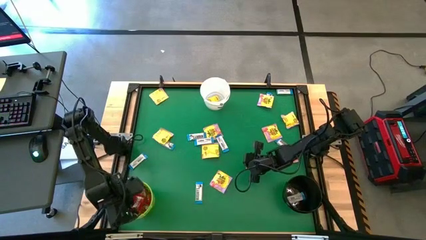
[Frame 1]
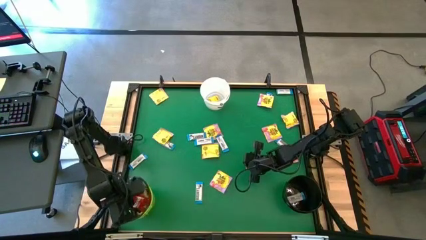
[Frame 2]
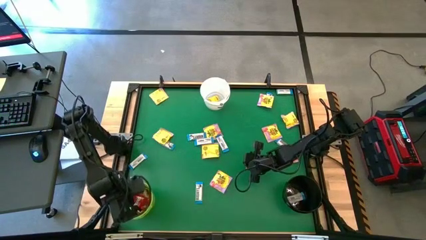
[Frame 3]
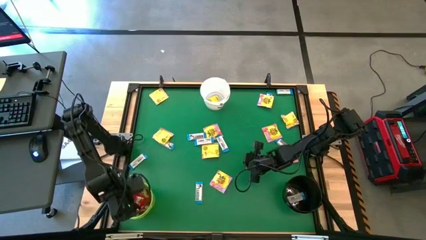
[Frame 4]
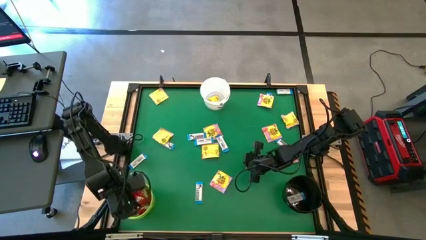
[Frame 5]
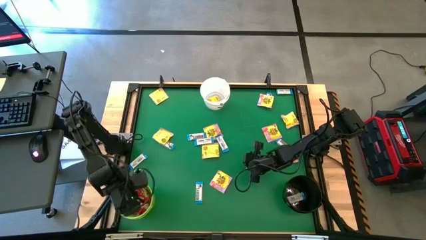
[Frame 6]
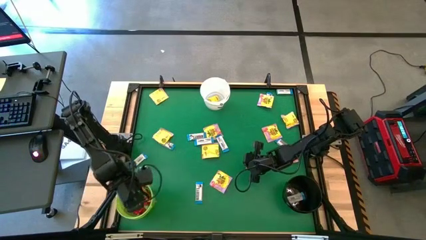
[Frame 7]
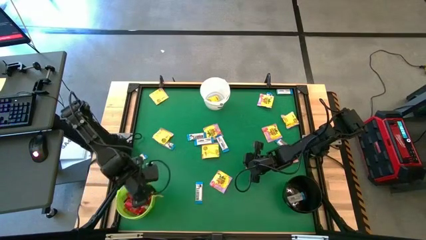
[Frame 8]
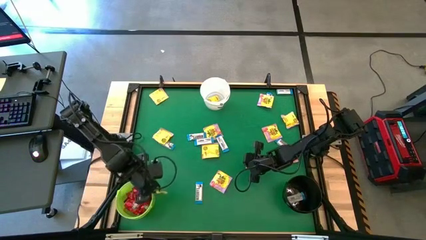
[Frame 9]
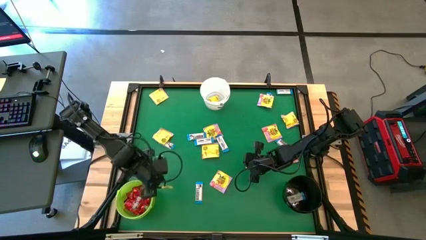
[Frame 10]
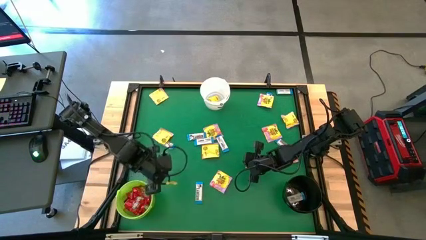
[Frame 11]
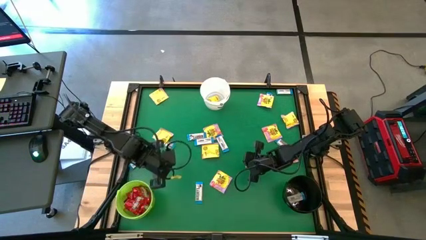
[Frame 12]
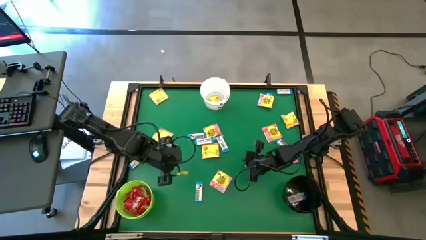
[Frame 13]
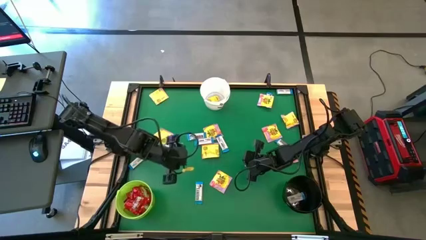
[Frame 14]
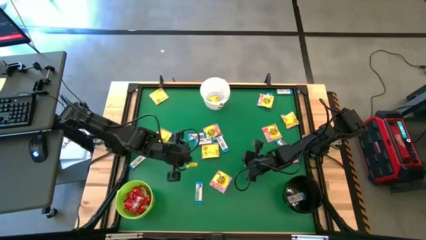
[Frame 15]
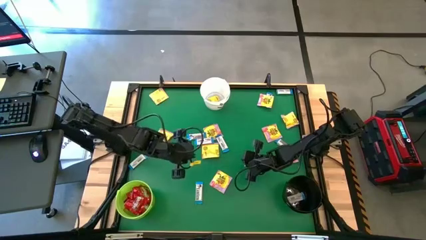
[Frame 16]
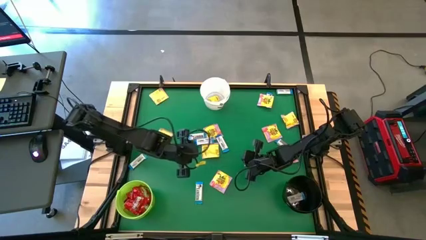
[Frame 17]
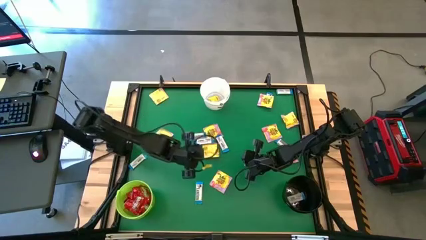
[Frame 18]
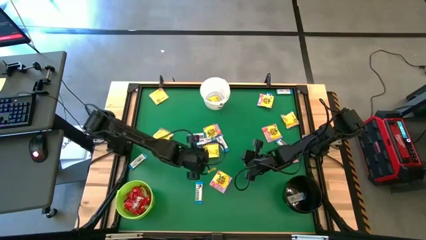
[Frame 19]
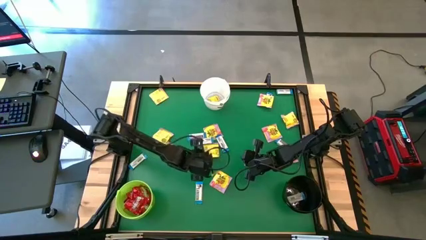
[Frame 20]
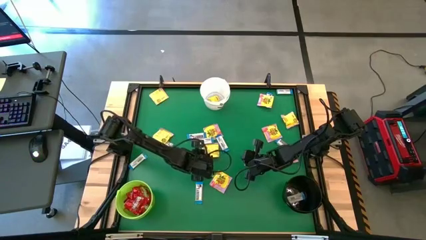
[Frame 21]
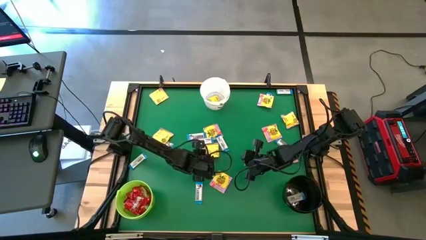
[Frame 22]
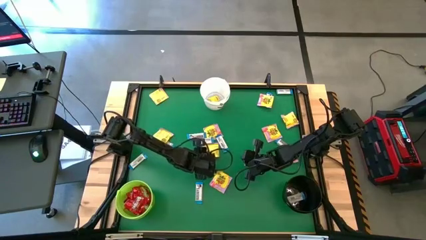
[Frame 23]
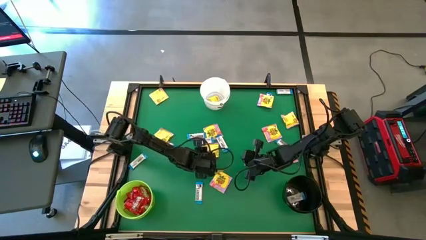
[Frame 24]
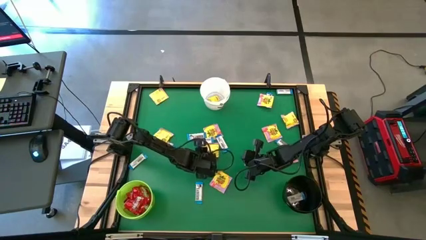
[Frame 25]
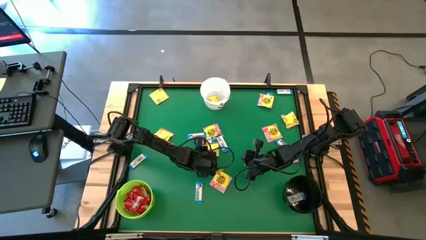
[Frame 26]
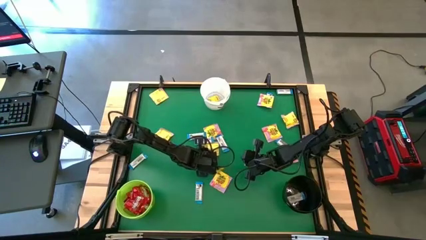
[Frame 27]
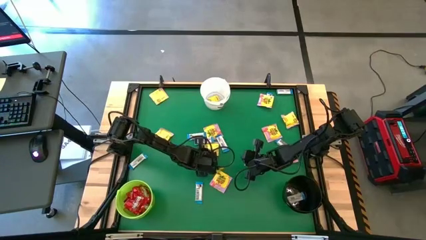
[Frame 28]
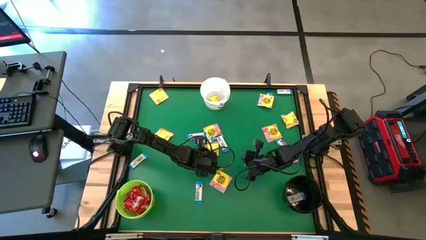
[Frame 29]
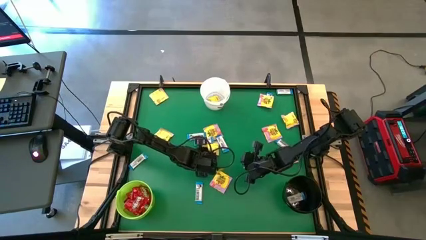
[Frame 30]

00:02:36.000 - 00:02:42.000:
Task: Sort candy by brand, put in halloween buckets
Put the white candy into the black bucket

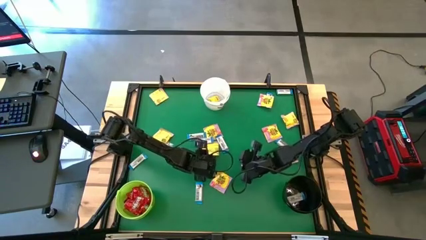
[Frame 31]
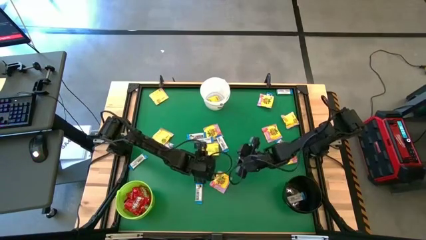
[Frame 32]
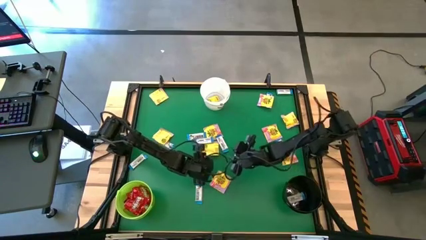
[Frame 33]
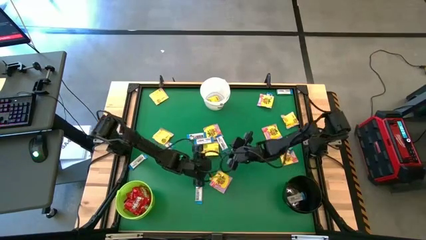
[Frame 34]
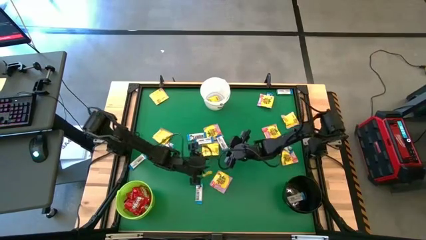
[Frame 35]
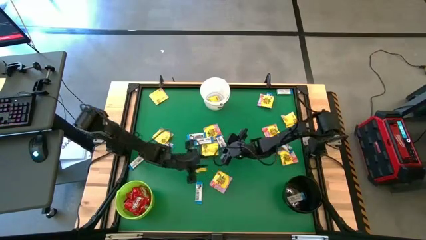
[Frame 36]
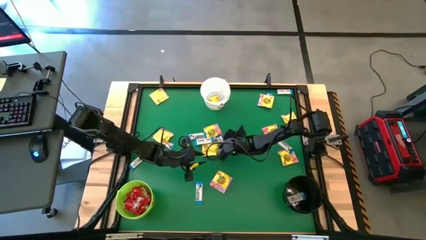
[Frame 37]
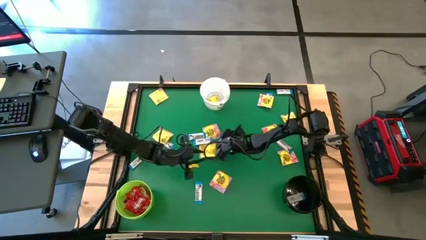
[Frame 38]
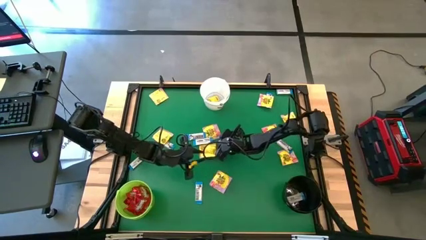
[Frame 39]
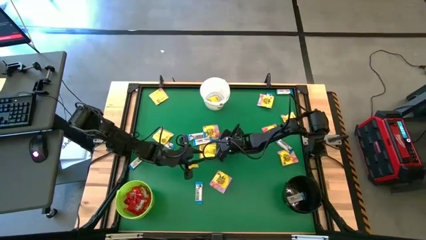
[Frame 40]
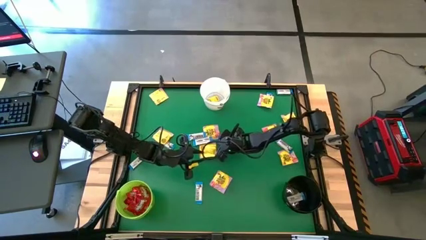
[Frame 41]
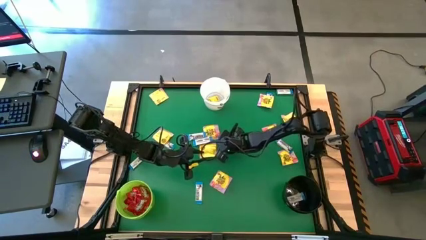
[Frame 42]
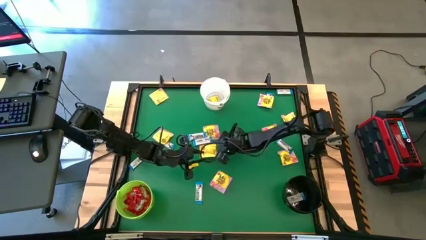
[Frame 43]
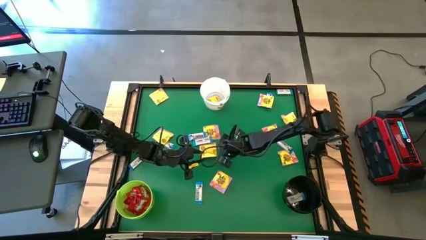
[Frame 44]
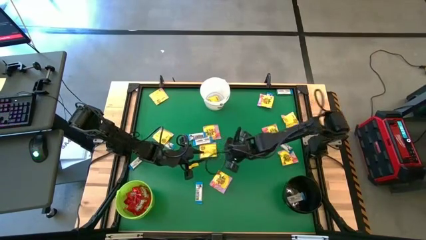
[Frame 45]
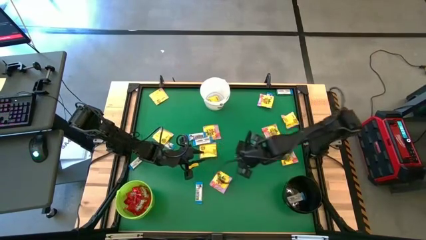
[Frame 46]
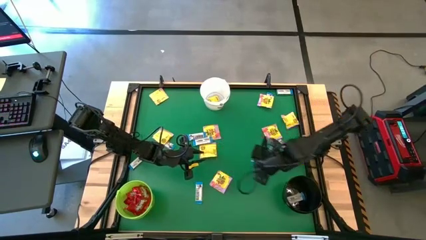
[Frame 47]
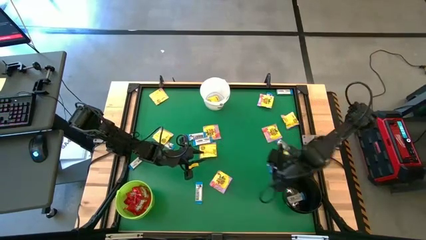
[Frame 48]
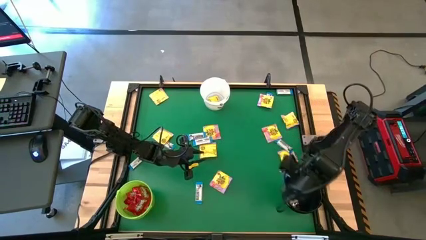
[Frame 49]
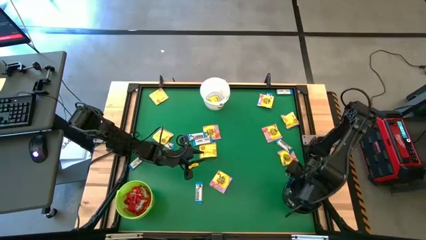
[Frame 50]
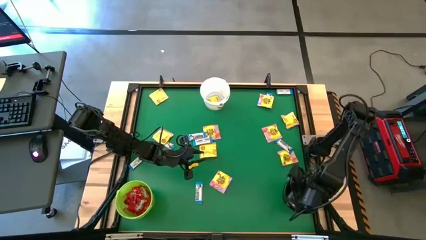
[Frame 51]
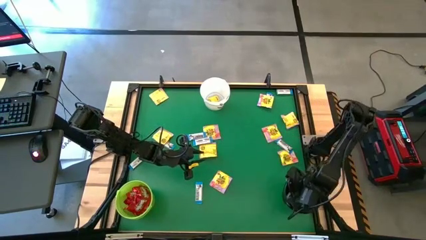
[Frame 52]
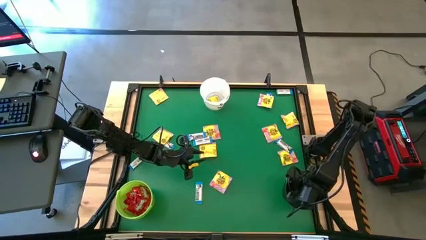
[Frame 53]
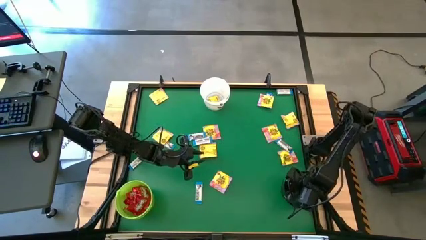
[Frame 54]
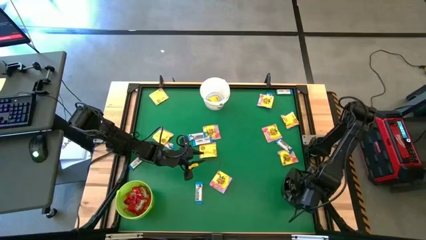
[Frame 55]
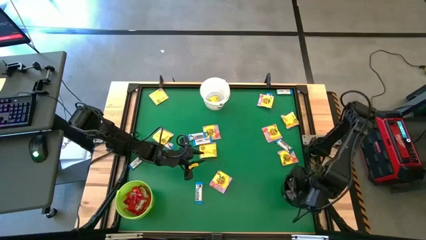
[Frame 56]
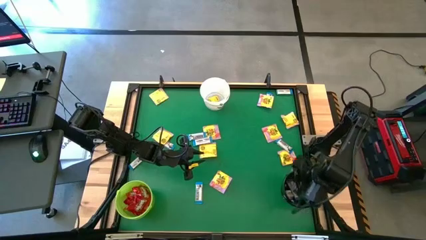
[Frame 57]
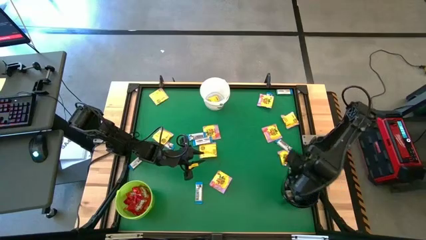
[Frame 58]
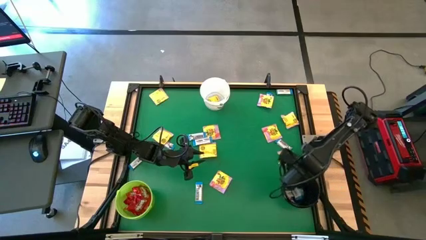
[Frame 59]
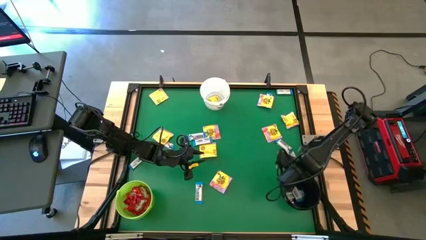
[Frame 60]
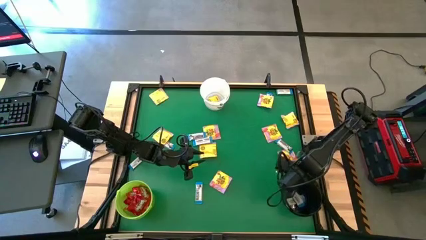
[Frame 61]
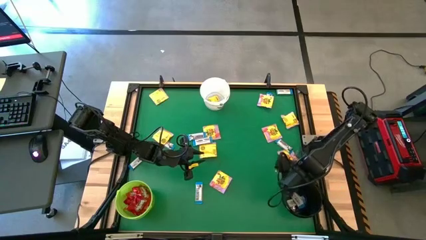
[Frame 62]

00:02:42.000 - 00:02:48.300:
Put the white candy into the black bucket

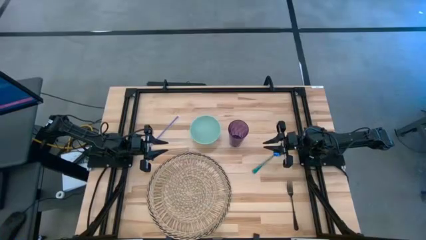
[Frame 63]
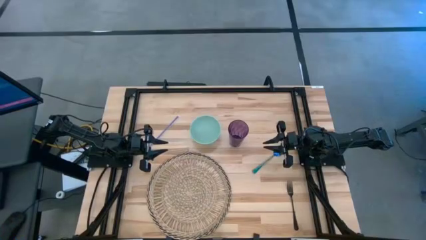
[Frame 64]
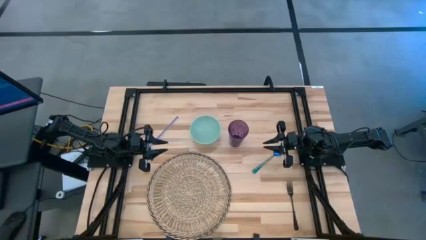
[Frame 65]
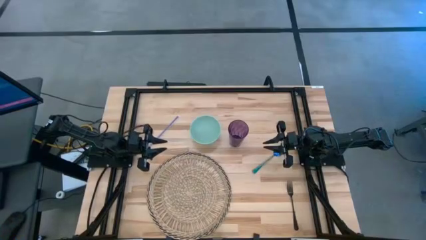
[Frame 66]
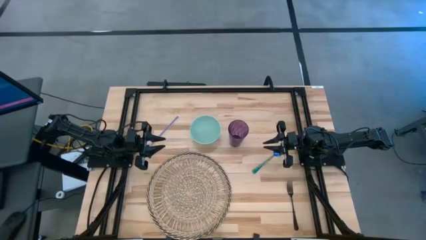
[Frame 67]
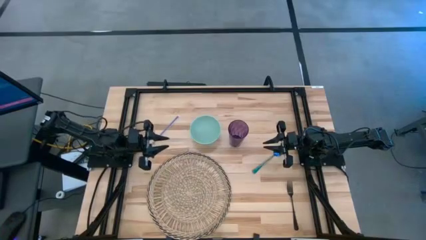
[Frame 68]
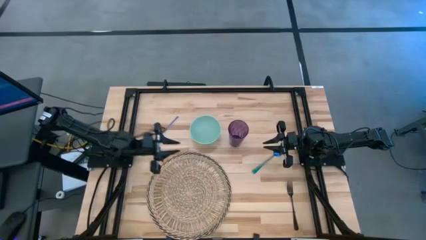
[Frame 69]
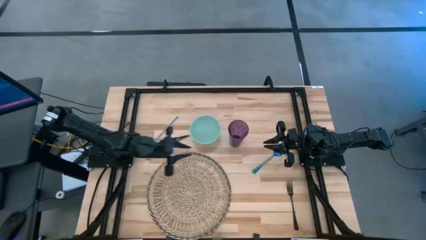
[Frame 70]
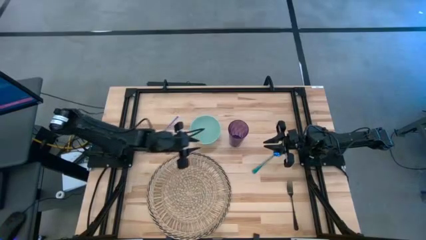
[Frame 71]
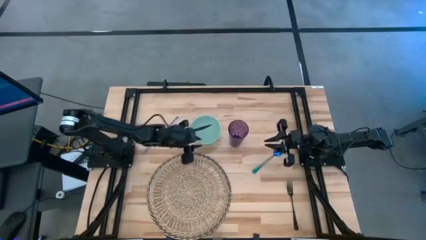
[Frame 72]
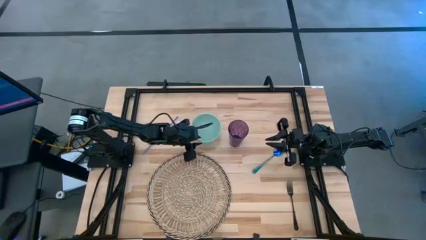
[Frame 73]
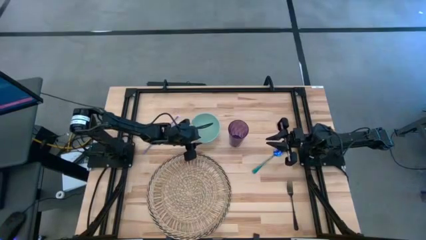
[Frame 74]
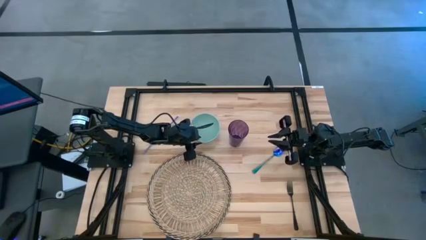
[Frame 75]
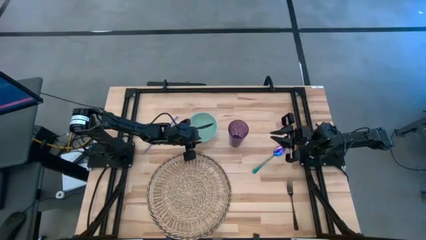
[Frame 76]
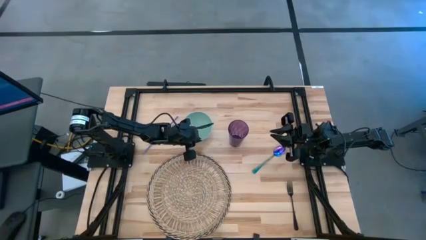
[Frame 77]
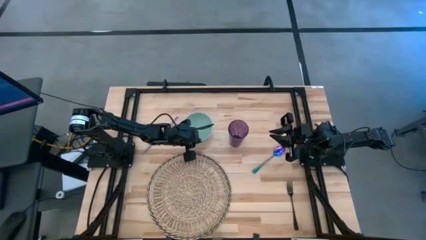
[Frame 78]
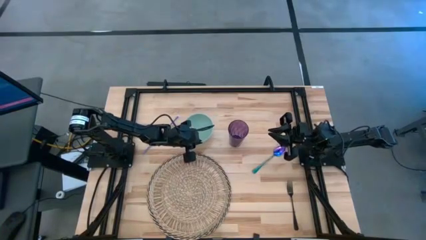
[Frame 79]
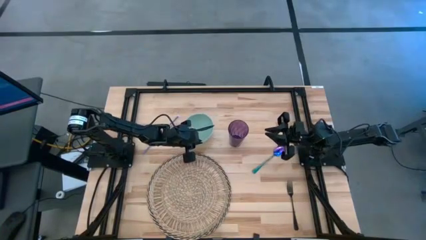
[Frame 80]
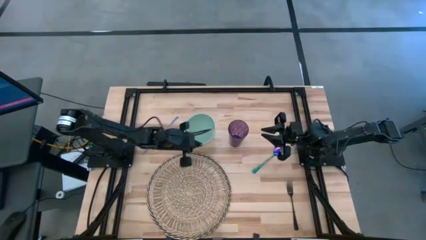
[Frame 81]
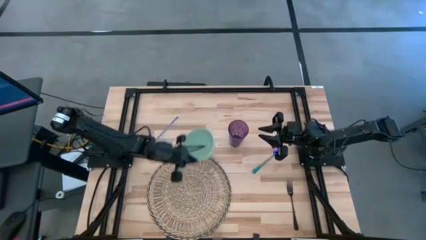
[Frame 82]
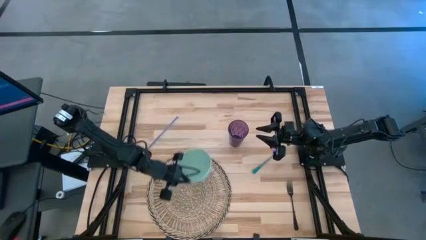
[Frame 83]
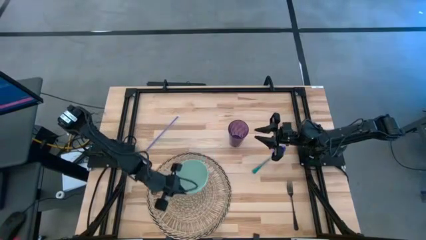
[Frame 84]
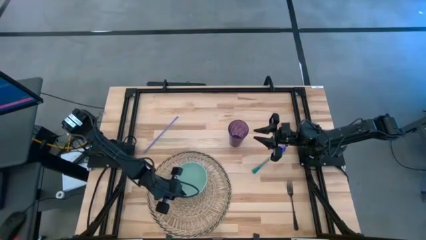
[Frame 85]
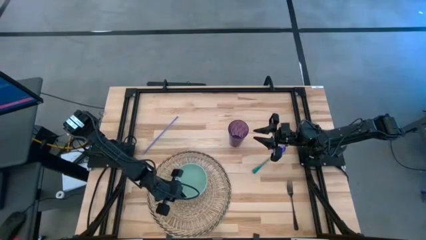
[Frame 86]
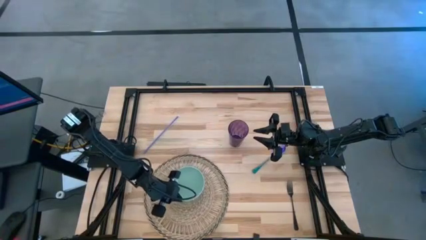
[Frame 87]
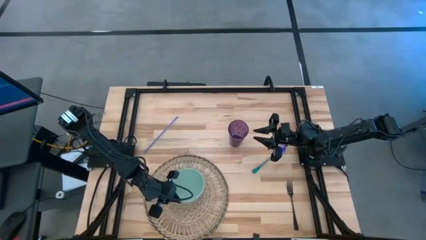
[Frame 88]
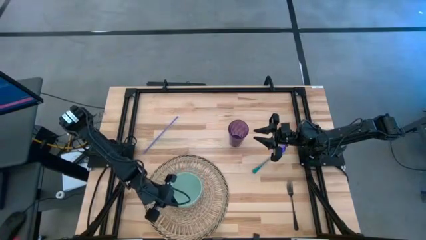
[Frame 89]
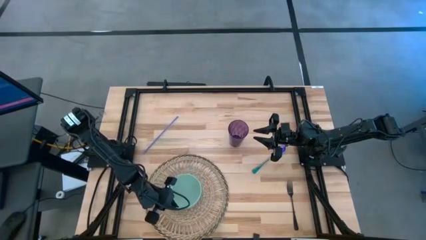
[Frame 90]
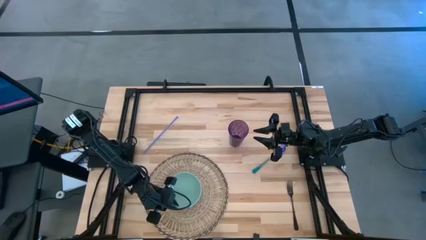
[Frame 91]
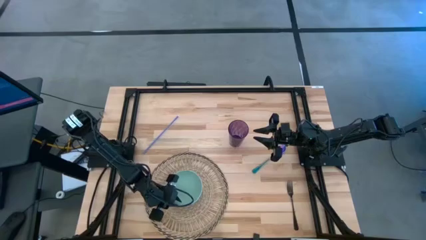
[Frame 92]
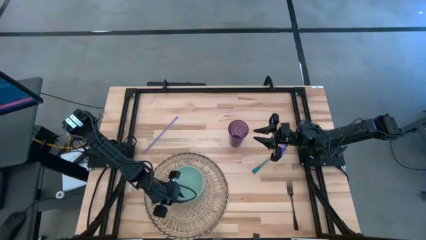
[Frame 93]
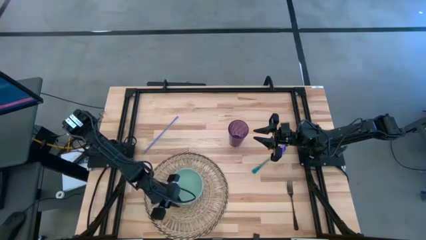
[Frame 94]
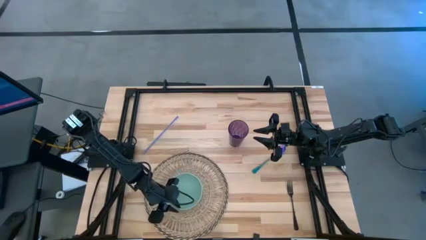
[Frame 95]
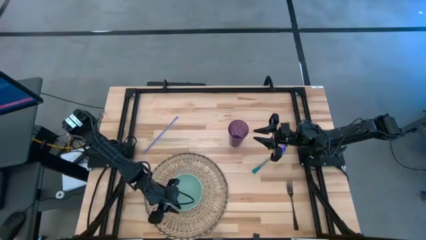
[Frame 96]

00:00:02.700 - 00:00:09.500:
Task: Pick & Place Utensil
Put the green bowl on the brown mat
